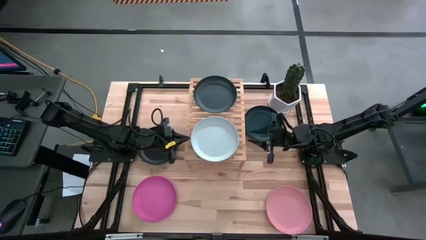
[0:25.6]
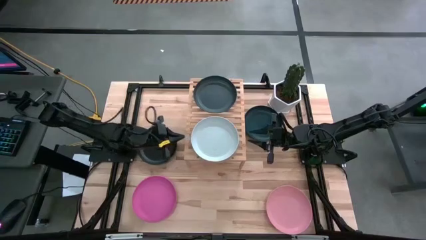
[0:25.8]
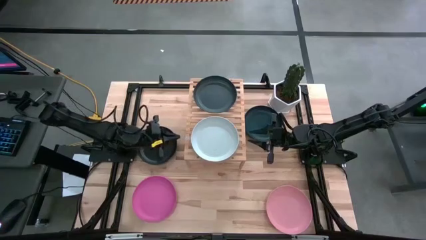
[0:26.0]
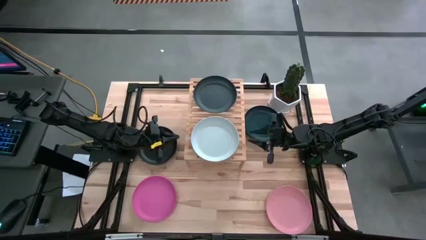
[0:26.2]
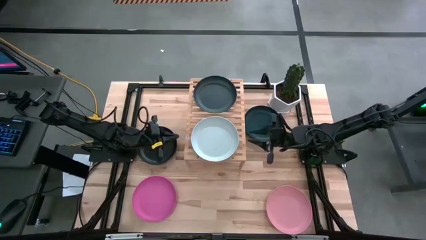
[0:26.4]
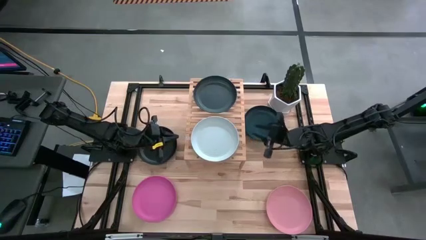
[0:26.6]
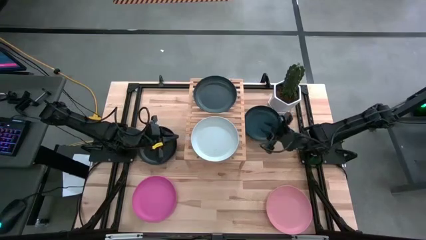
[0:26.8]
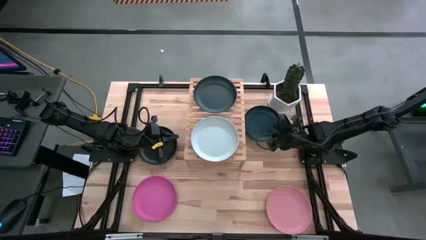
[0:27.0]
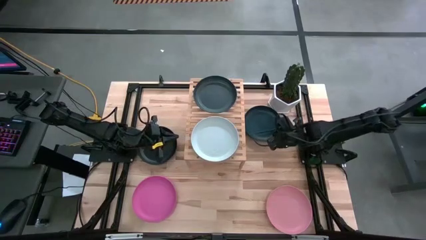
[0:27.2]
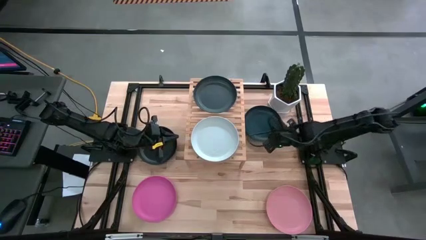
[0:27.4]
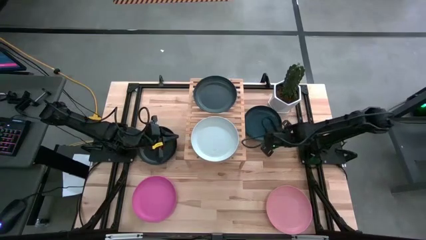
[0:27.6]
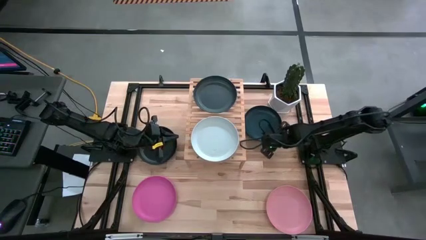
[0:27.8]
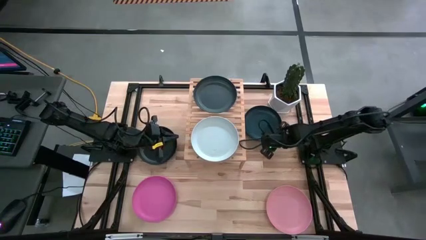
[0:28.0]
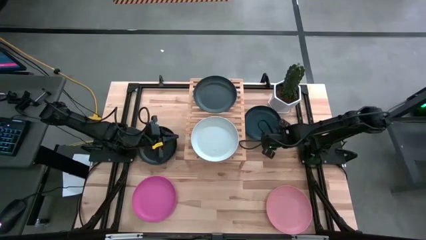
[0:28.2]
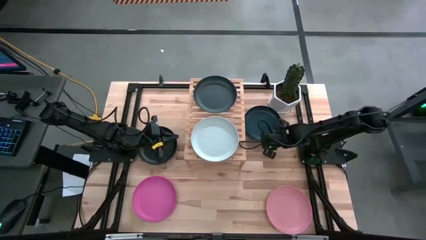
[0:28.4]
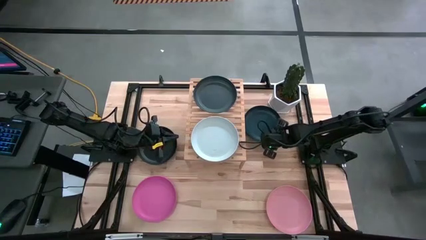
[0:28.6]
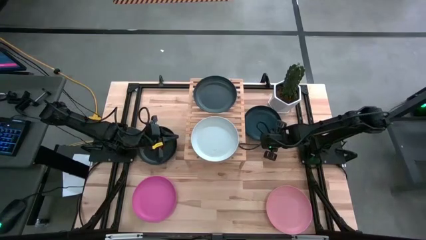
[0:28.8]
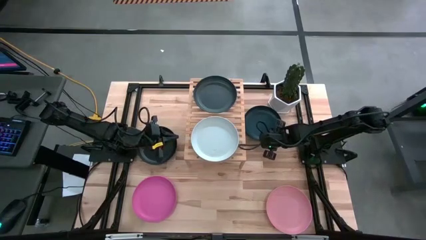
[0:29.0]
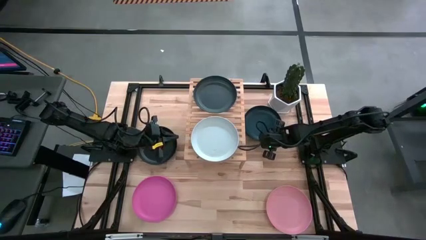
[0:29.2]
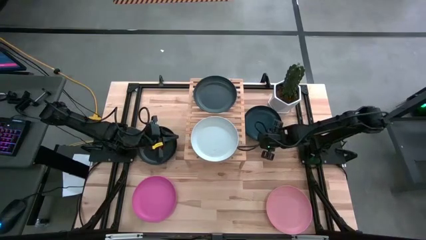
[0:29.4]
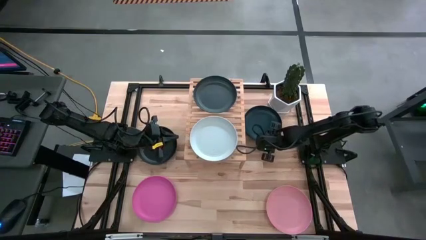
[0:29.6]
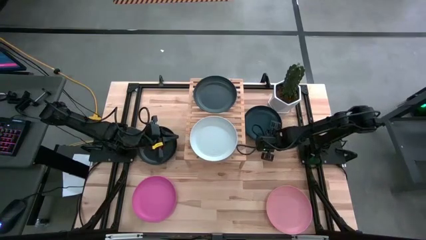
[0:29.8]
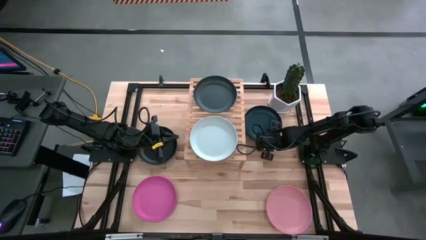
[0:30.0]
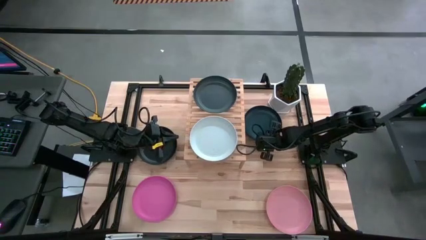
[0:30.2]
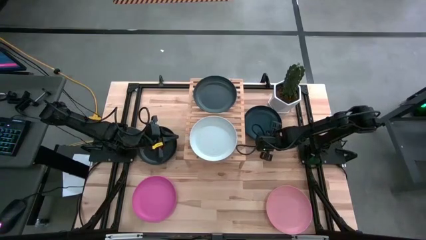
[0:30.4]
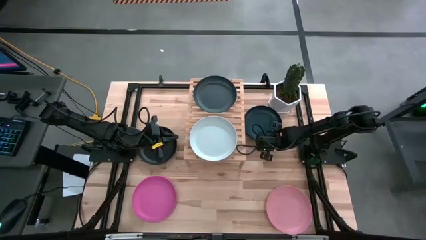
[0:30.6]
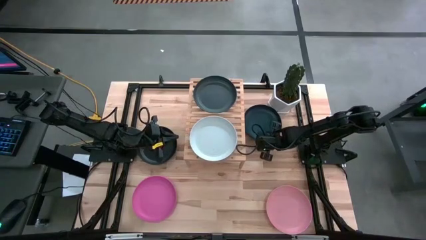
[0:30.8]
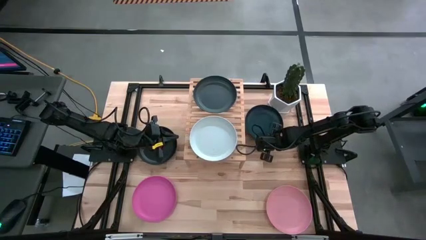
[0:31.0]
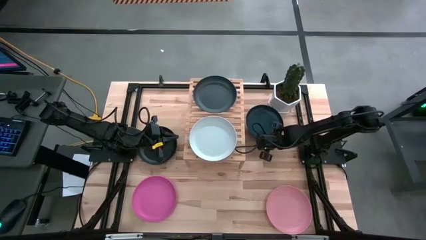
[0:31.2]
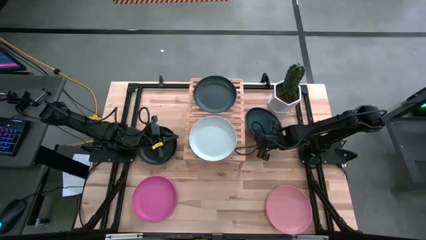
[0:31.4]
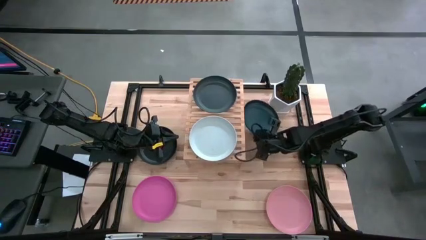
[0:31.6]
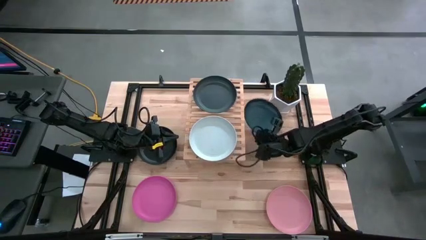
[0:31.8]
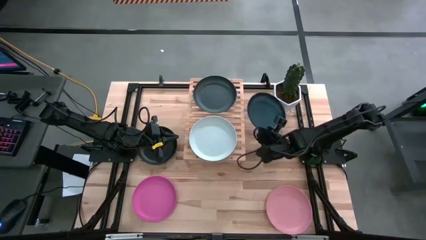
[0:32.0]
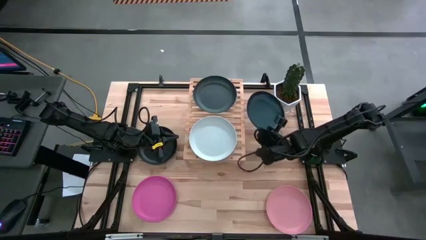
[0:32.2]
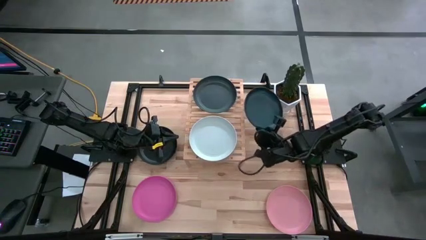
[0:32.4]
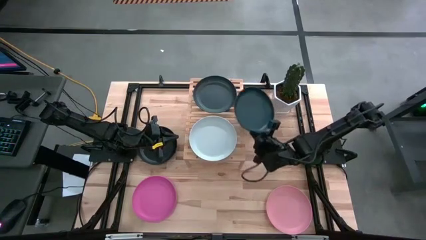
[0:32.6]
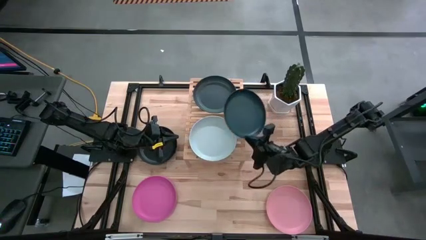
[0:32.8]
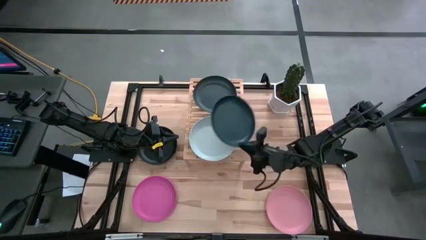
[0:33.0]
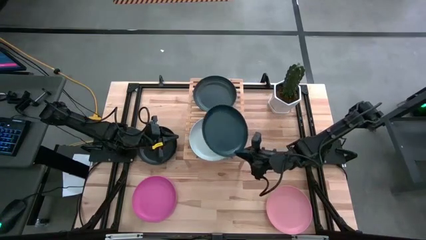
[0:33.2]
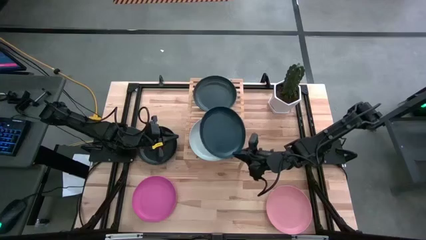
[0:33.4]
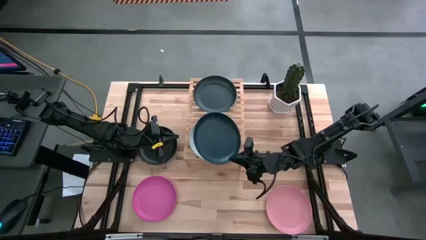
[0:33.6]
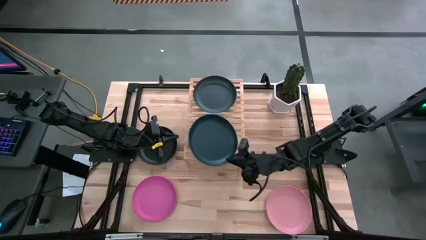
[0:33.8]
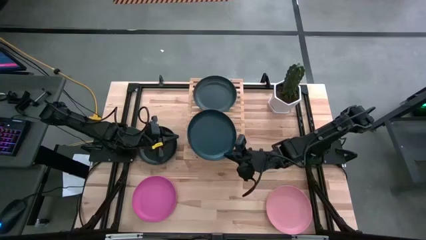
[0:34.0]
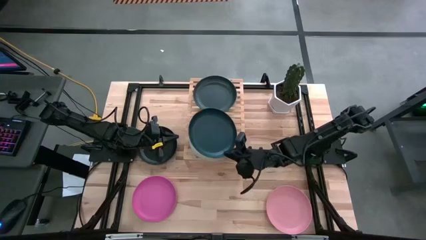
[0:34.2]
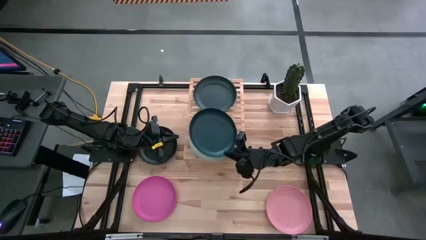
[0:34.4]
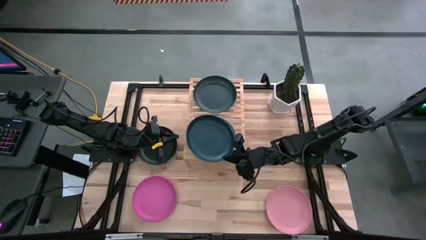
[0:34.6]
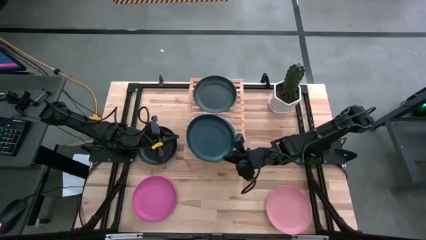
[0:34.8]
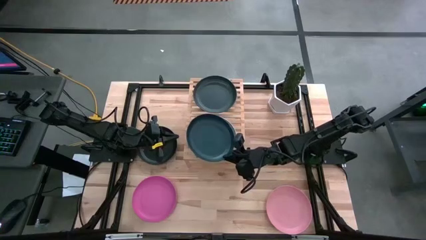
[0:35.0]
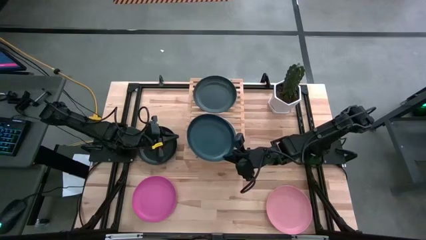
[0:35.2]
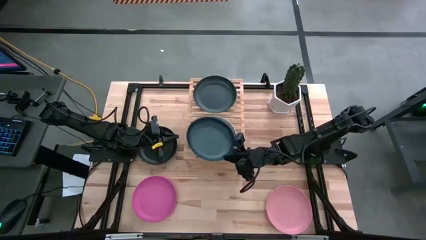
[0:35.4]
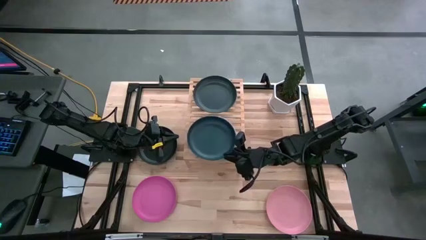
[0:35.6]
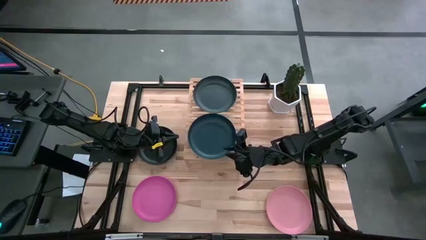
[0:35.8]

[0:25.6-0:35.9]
Task: Place and stack plates onto a shelf
Stack dark blue plate on top of the white plate on the shelf
